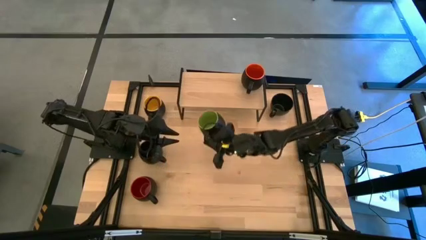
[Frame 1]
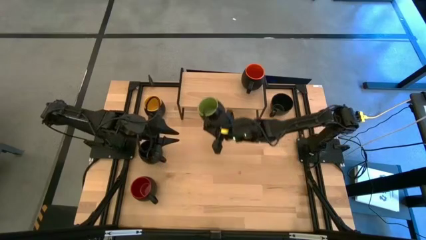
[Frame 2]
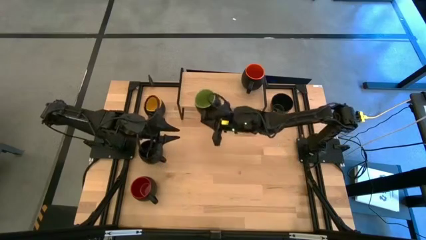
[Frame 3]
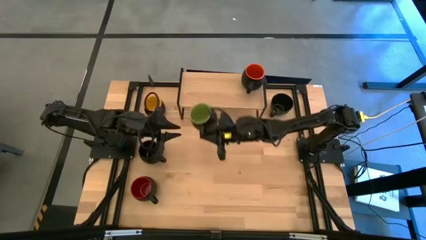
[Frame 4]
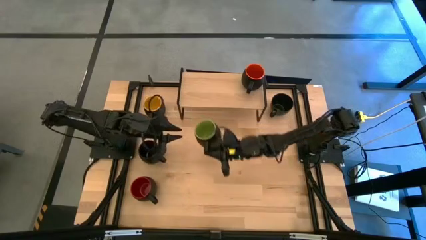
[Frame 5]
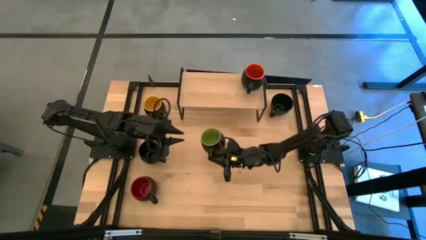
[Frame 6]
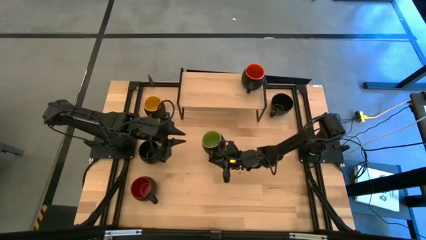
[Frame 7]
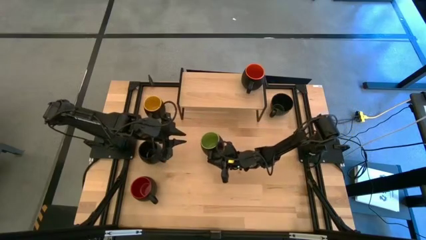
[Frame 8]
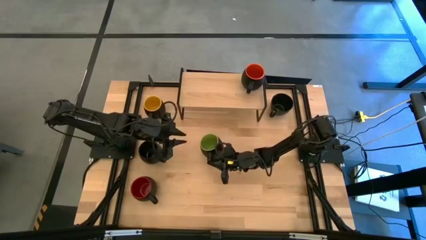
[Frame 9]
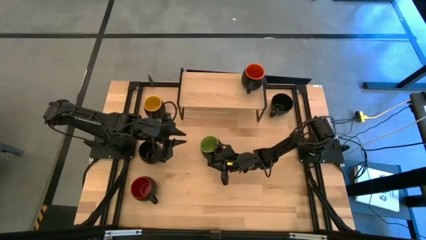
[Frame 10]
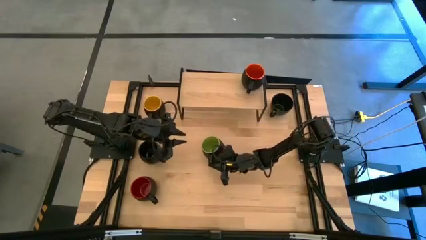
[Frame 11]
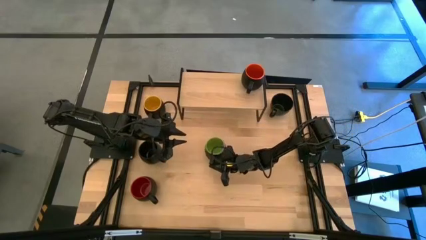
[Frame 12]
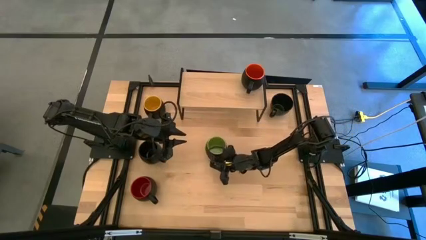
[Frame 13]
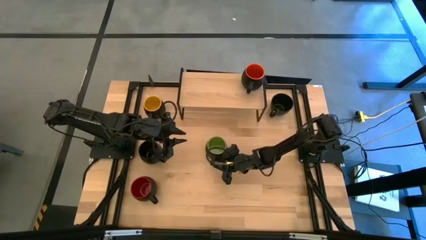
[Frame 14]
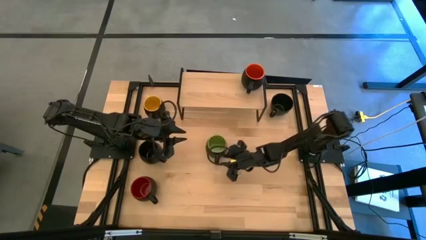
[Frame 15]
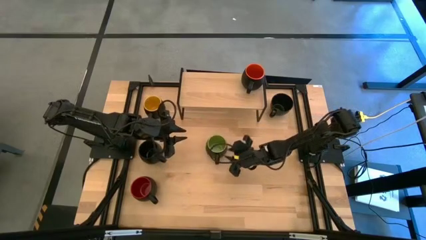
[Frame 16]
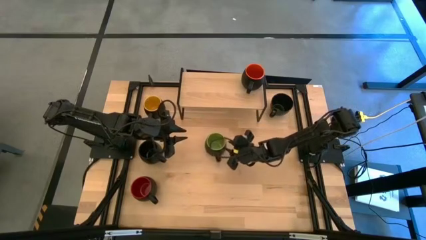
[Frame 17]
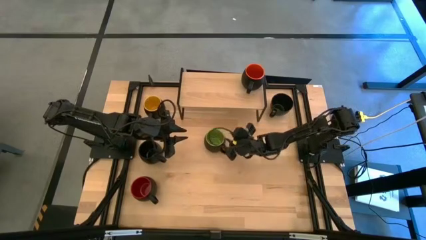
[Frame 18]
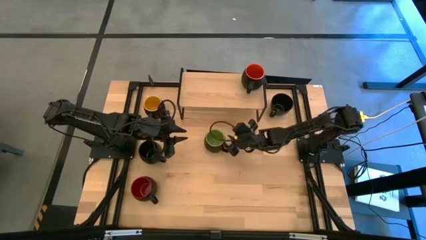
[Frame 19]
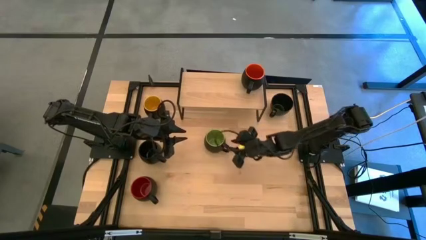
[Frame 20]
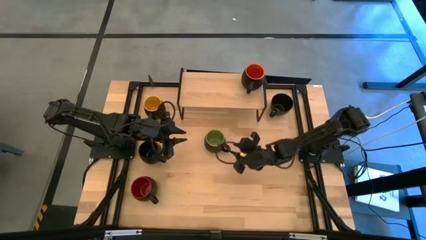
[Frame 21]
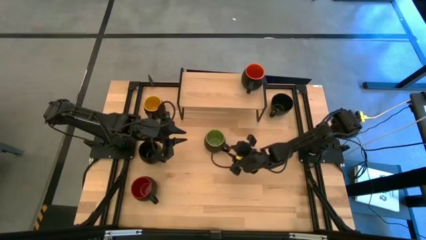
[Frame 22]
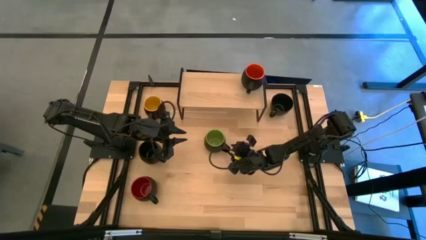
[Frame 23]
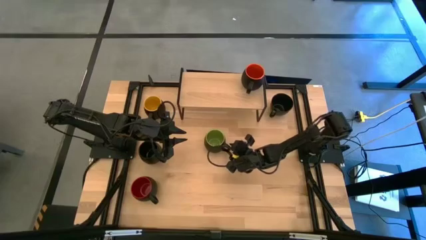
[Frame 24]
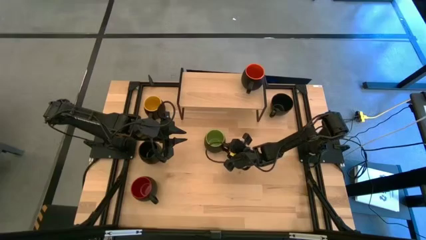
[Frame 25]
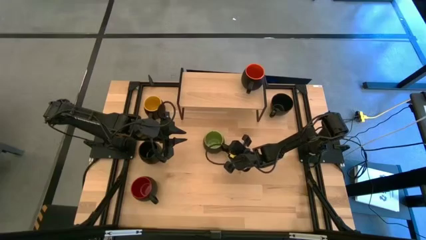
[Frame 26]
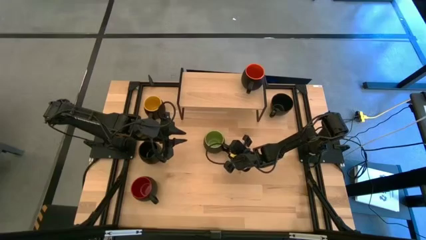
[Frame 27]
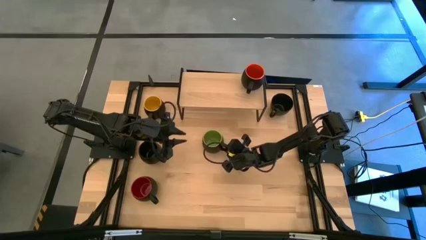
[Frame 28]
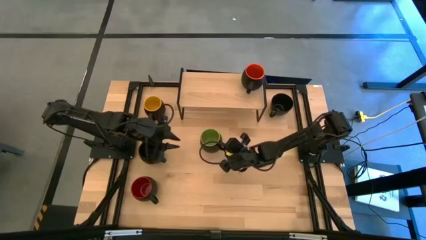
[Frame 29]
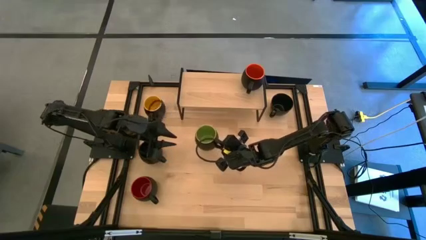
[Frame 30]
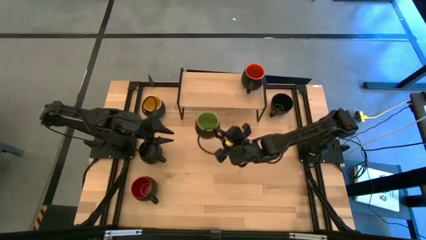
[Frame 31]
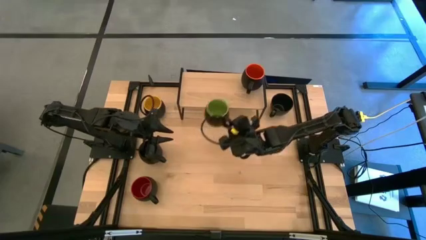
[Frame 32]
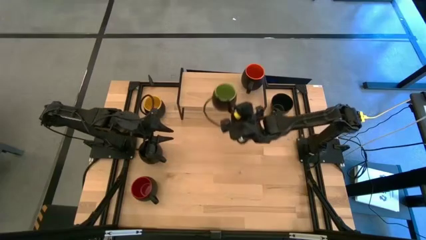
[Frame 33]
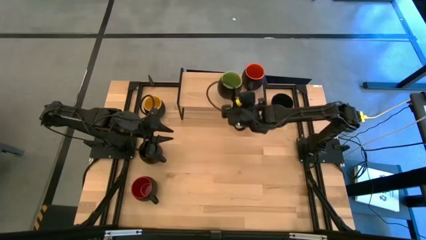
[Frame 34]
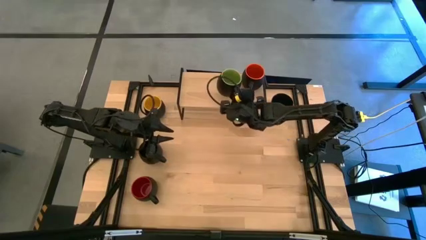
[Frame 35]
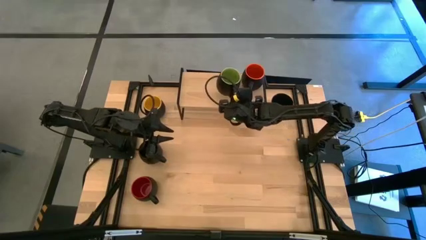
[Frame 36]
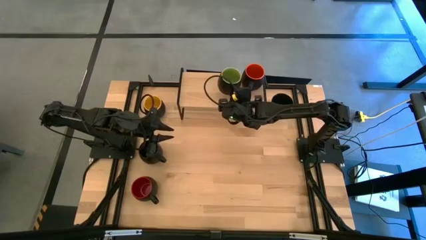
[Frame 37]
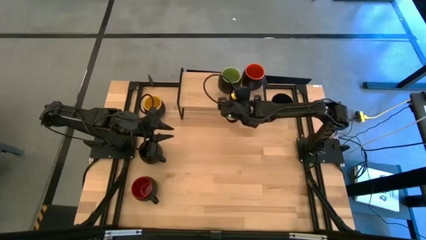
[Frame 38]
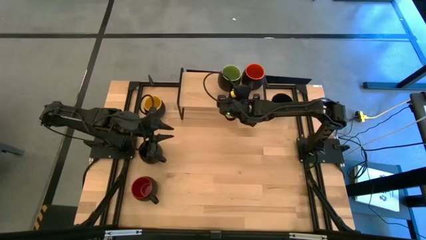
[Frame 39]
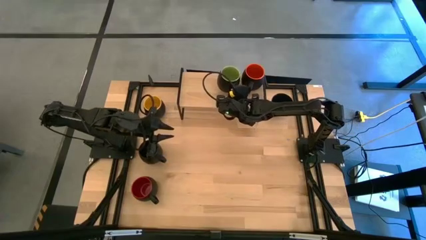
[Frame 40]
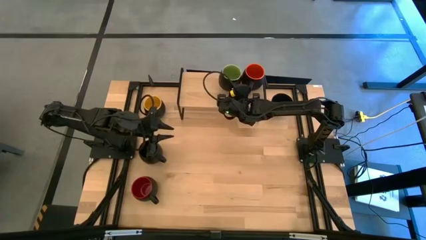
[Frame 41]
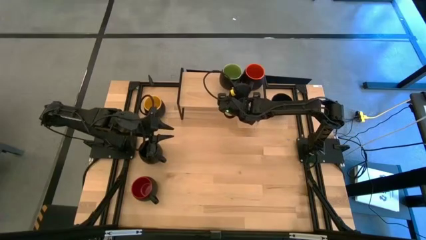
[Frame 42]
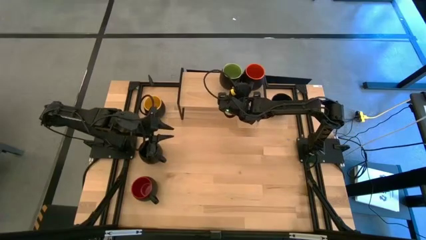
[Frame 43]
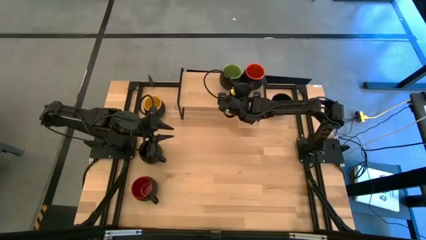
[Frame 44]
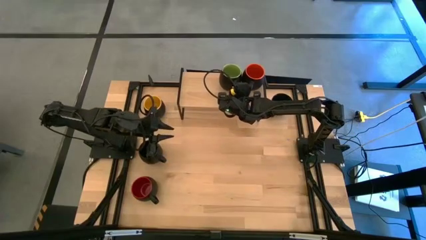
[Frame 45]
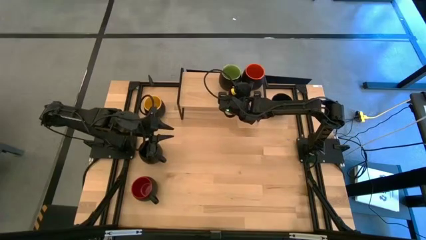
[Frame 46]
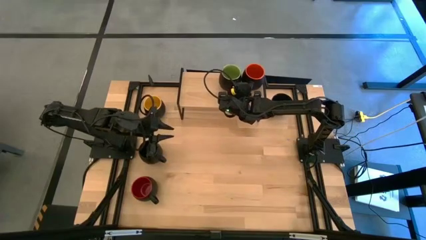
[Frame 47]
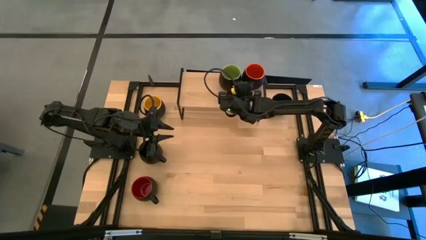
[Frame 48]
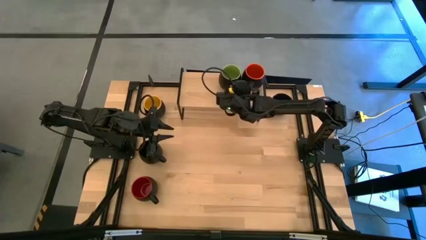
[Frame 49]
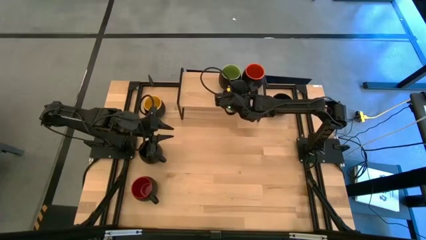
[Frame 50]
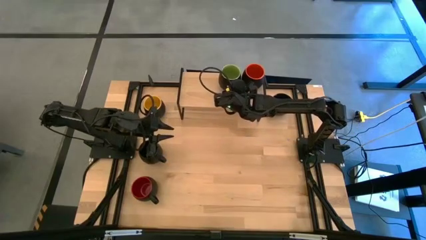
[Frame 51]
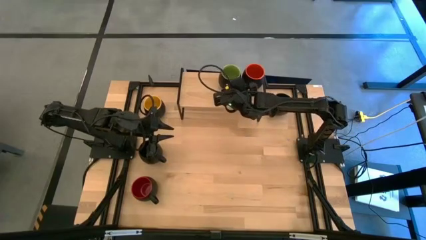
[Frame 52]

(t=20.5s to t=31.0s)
Task: Place coffee mugs
Put the green mug on the shelf

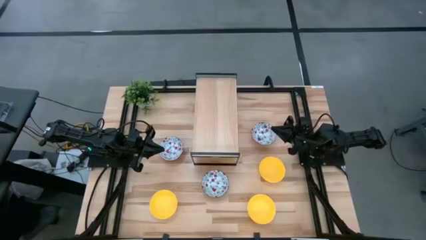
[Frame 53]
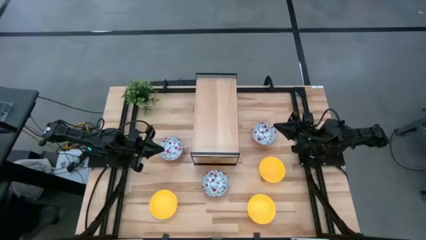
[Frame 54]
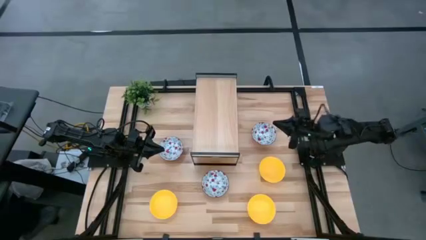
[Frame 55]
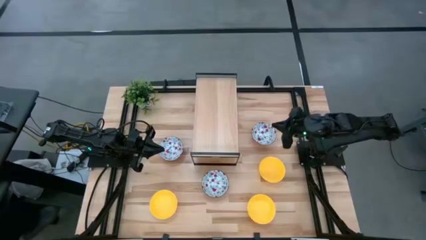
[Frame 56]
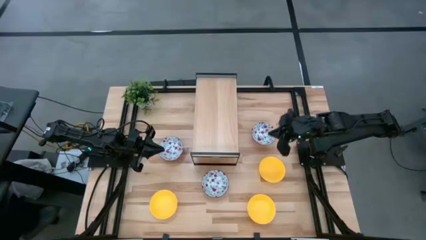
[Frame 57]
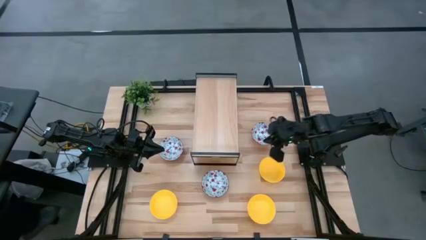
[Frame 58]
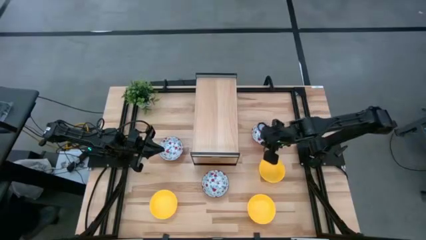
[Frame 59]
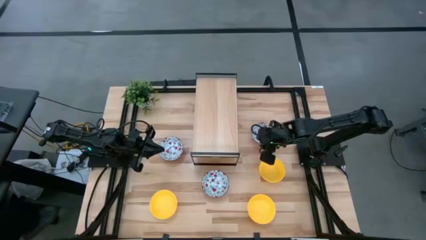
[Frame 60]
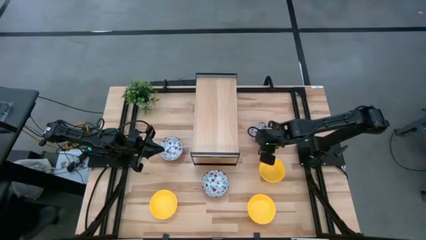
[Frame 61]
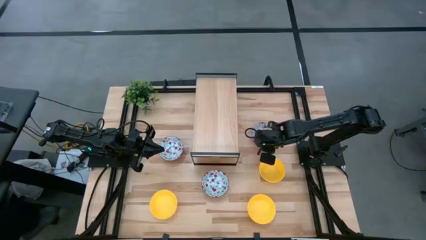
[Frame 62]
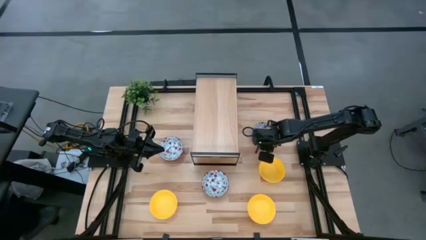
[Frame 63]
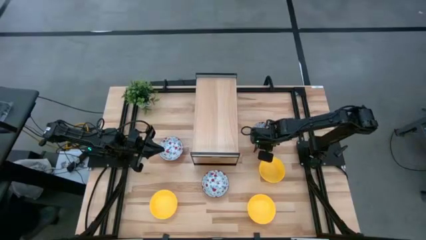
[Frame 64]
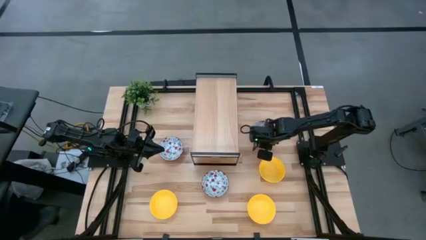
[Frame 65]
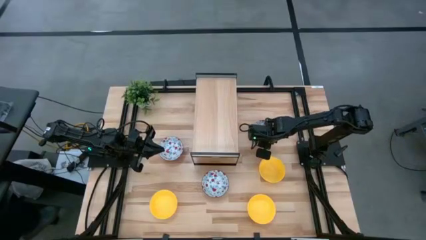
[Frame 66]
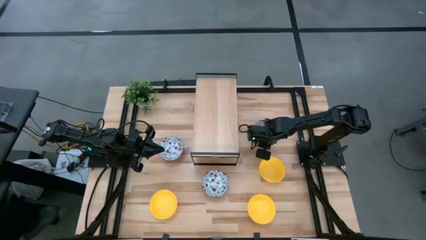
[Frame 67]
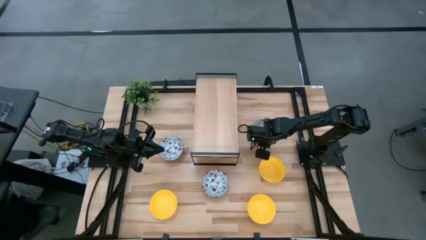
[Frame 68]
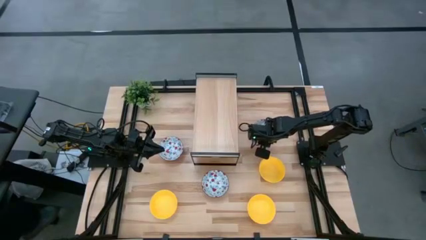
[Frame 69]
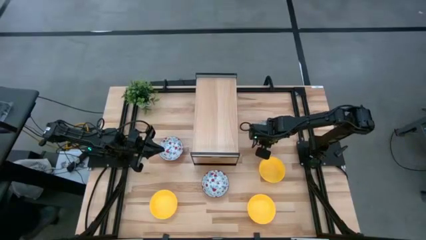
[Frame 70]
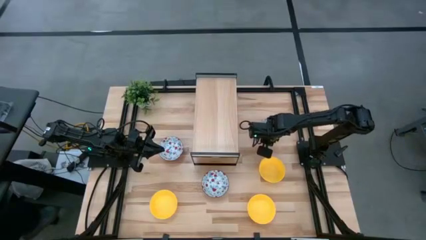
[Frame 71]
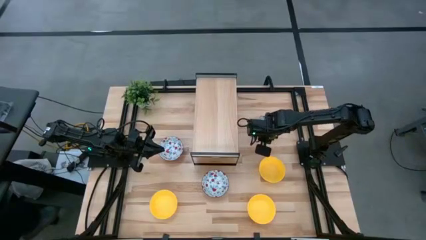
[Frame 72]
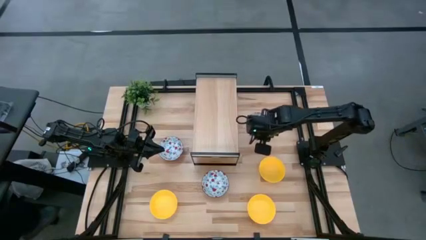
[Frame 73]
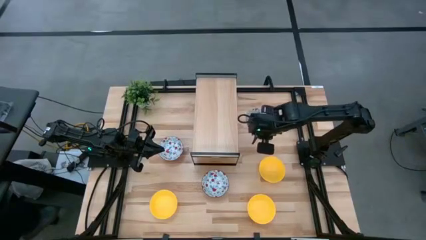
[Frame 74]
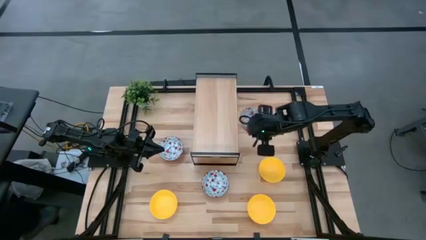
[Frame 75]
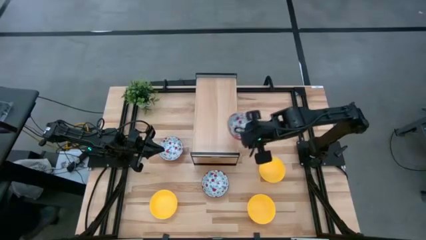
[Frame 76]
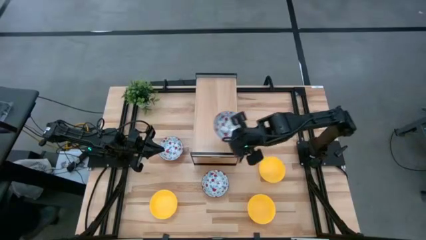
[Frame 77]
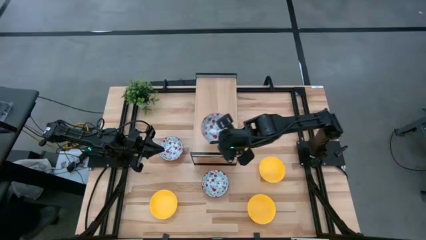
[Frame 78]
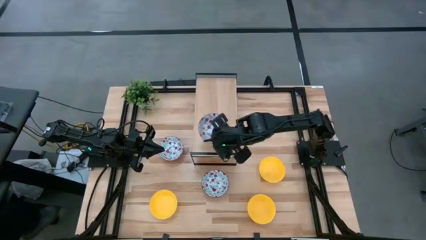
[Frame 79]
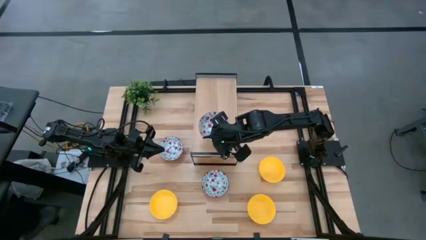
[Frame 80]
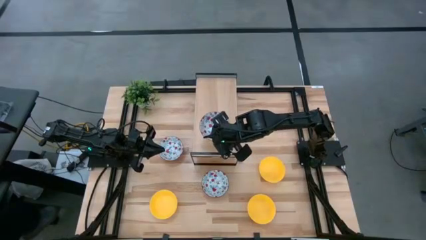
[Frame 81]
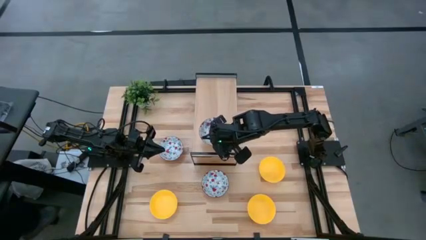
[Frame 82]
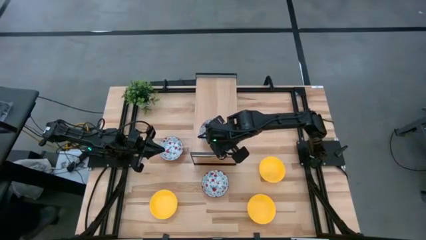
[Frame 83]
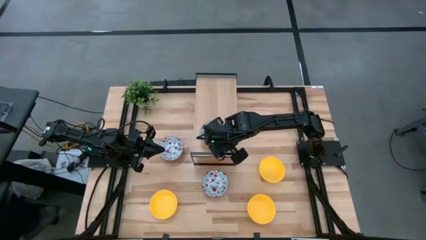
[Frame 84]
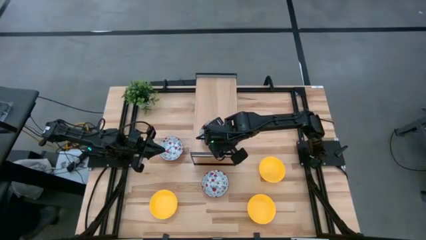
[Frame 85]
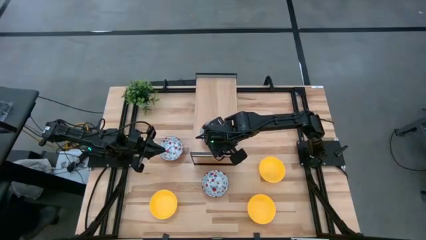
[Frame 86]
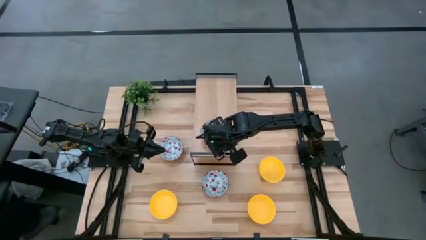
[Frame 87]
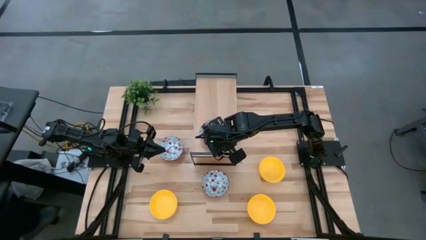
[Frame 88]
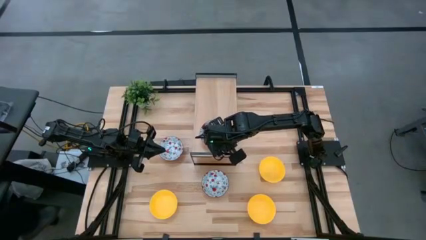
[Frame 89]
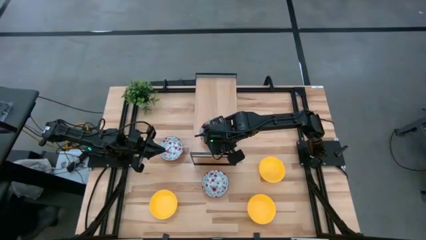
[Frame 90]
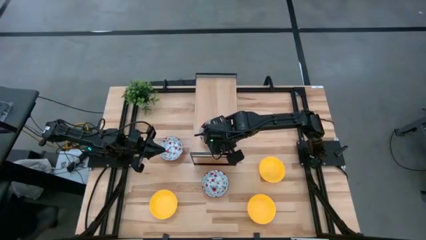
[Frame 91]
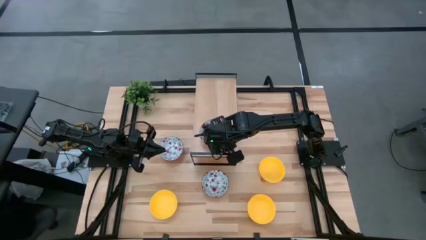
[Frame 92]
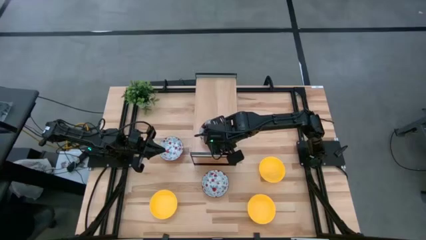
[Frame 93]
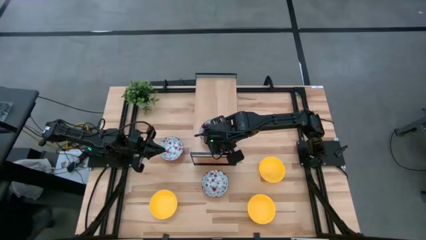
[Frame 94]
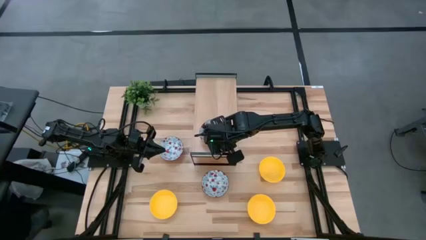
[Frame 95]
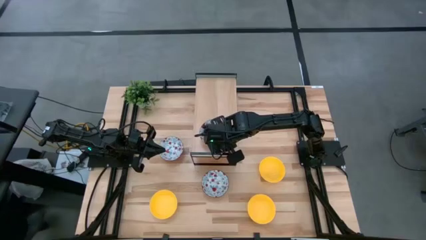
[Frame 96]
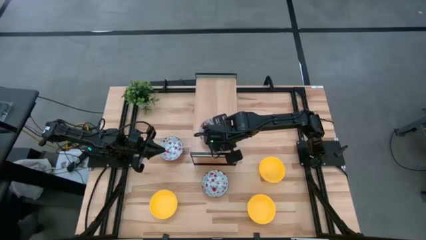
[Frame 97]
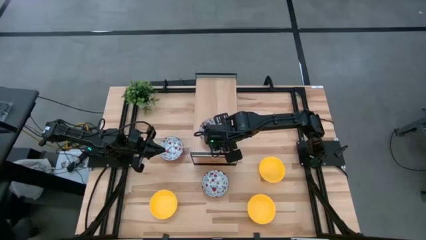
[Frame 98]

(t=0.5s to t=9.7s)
Task: Pick & Place Mini bowls
Put the top right white patterned bowl on the shelf
